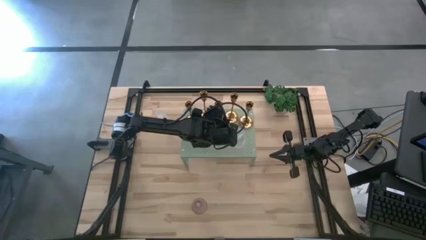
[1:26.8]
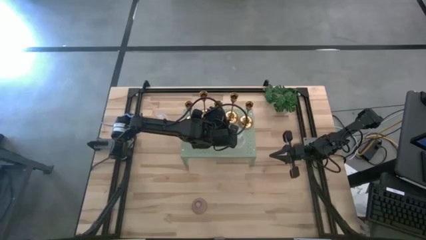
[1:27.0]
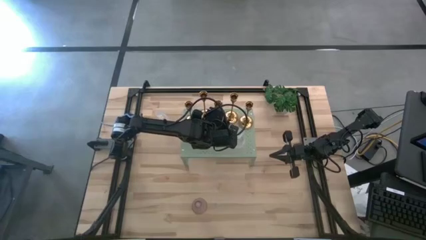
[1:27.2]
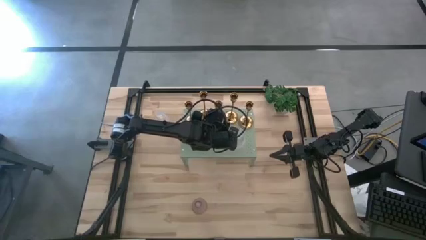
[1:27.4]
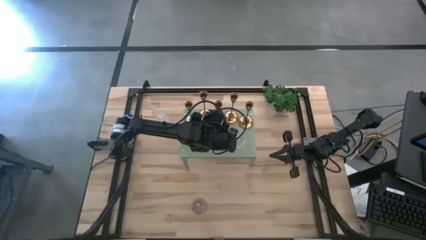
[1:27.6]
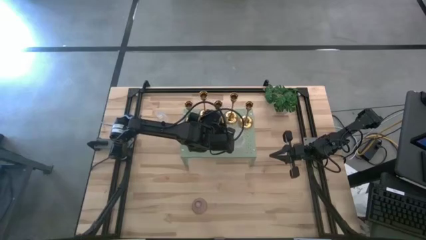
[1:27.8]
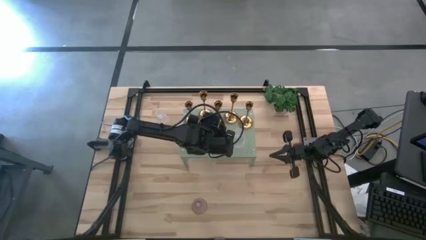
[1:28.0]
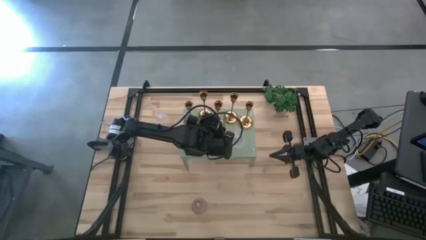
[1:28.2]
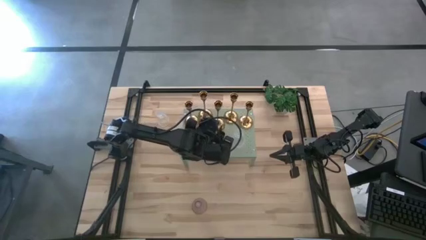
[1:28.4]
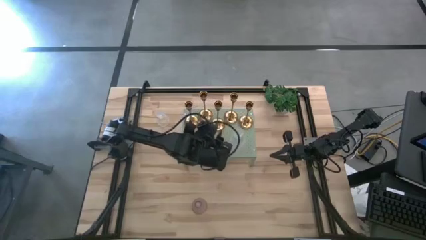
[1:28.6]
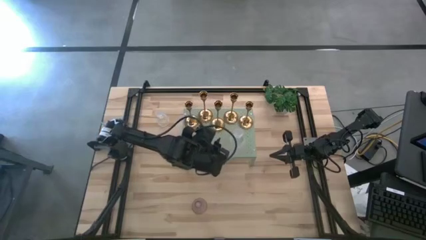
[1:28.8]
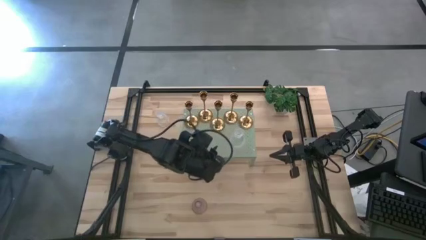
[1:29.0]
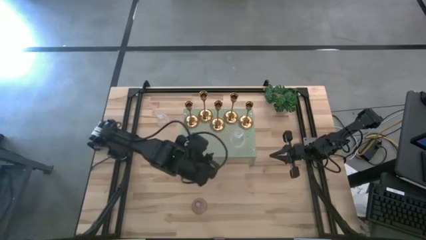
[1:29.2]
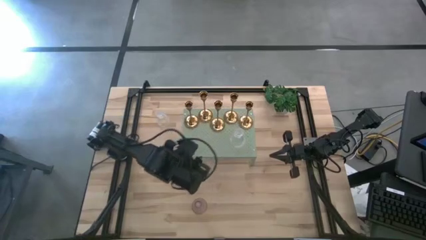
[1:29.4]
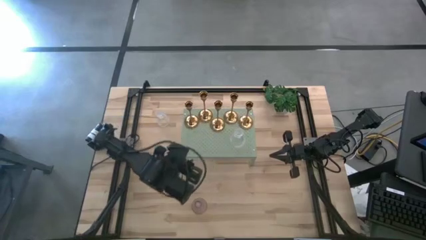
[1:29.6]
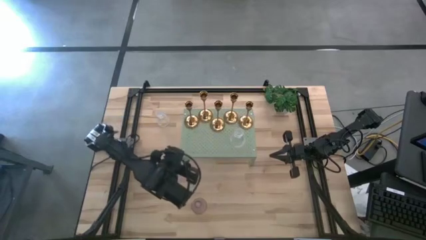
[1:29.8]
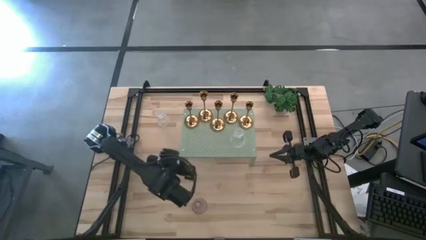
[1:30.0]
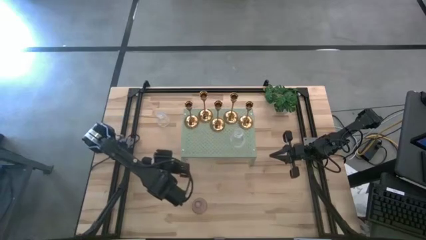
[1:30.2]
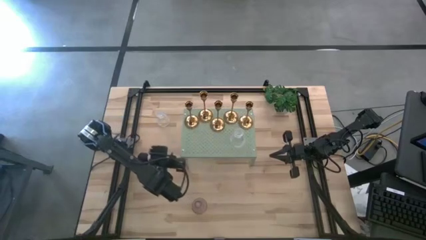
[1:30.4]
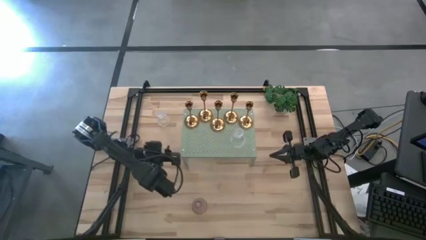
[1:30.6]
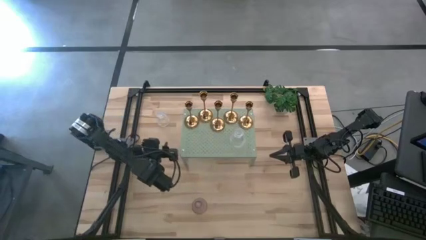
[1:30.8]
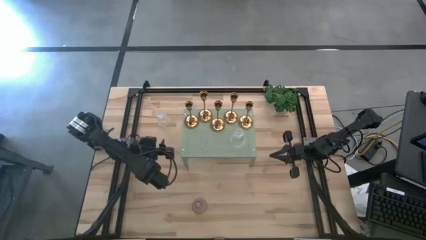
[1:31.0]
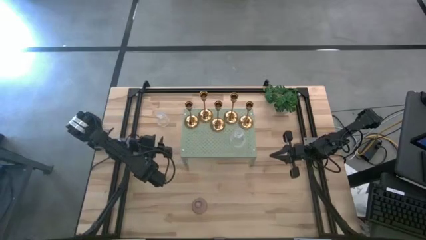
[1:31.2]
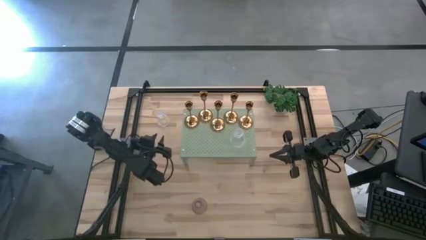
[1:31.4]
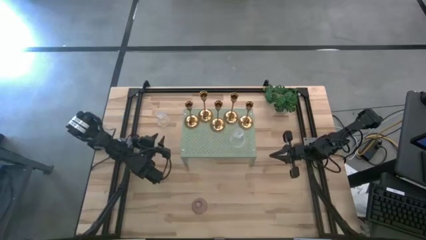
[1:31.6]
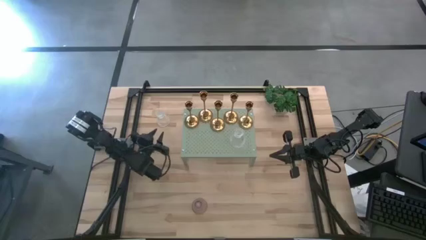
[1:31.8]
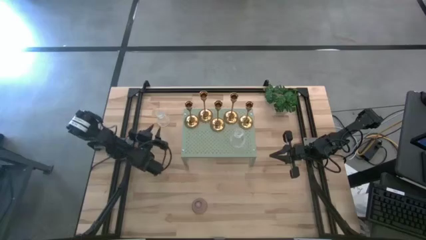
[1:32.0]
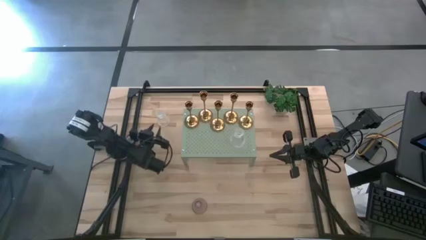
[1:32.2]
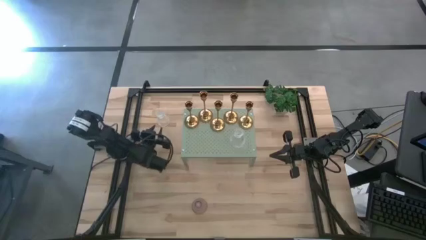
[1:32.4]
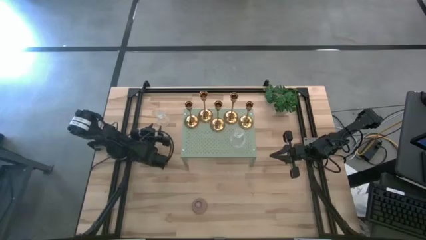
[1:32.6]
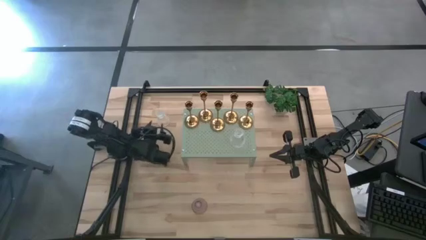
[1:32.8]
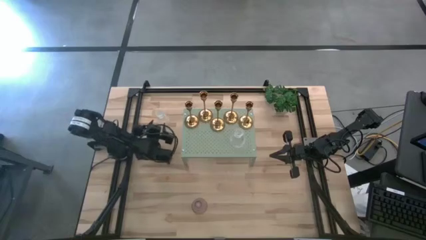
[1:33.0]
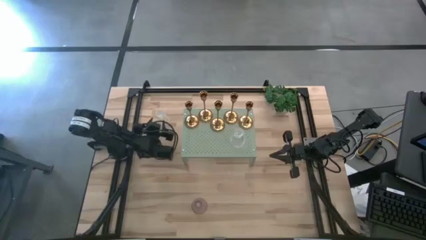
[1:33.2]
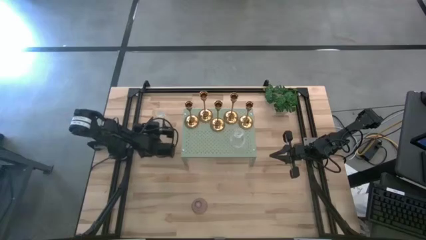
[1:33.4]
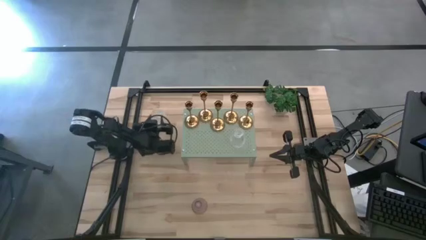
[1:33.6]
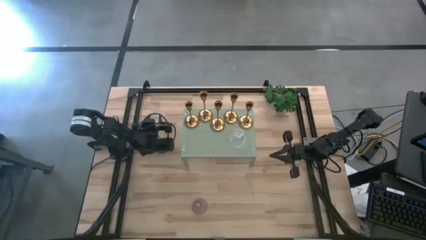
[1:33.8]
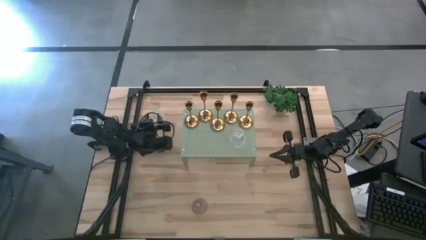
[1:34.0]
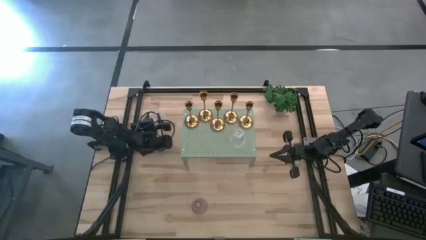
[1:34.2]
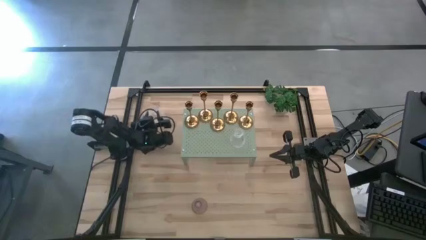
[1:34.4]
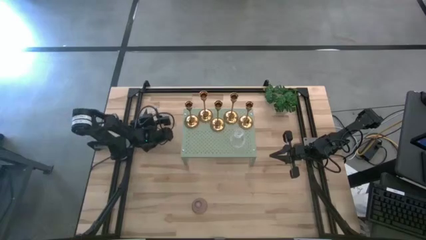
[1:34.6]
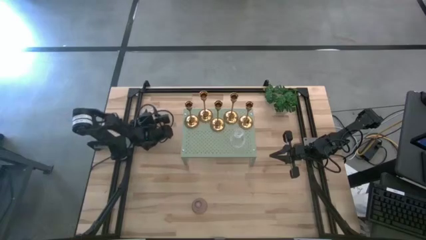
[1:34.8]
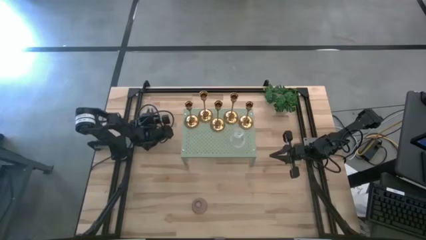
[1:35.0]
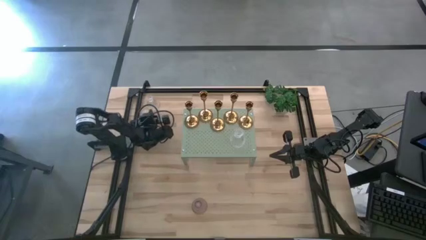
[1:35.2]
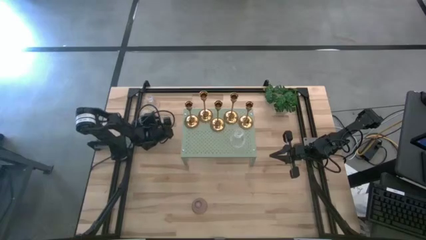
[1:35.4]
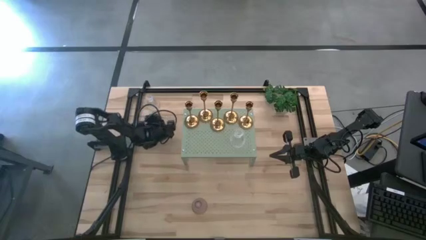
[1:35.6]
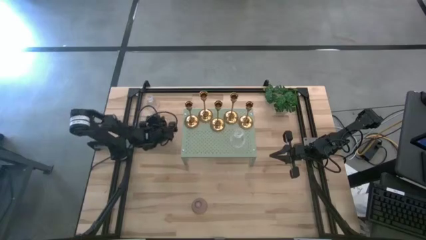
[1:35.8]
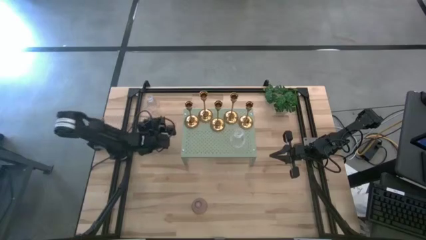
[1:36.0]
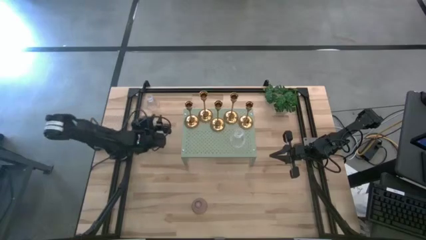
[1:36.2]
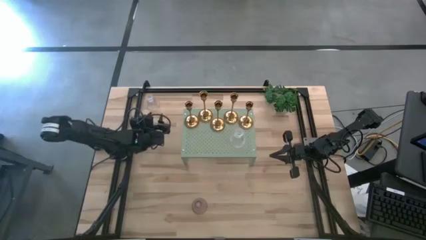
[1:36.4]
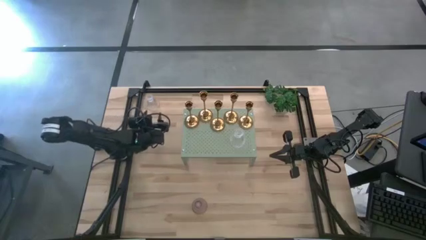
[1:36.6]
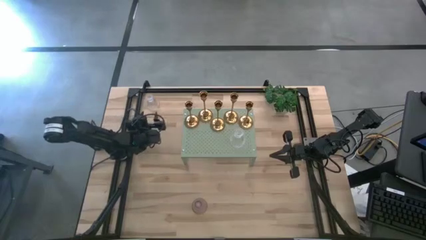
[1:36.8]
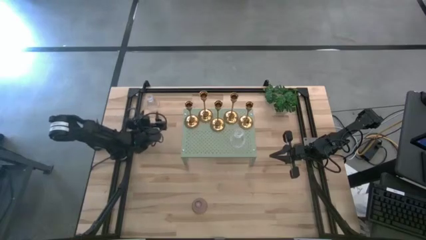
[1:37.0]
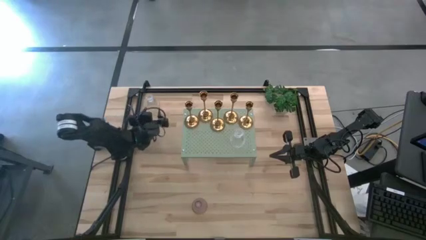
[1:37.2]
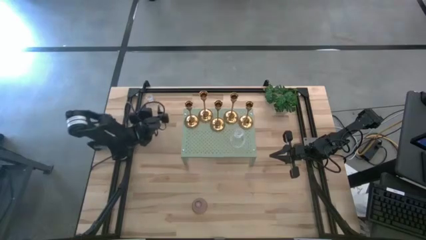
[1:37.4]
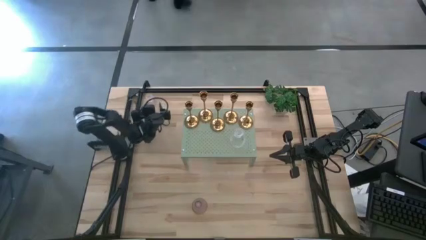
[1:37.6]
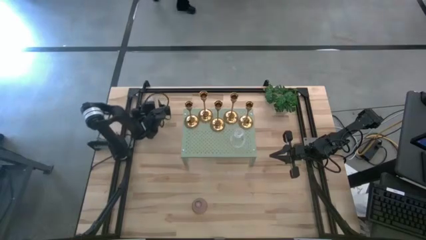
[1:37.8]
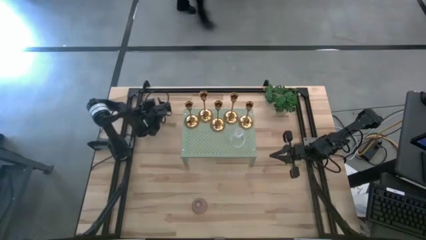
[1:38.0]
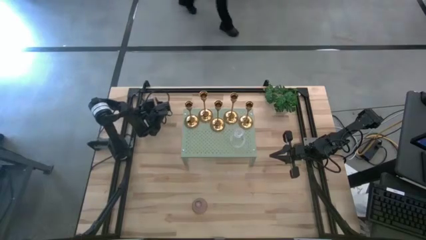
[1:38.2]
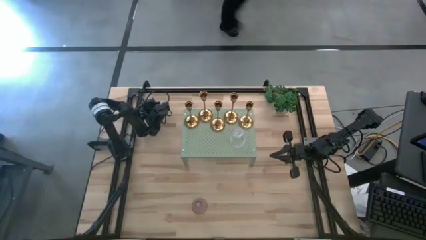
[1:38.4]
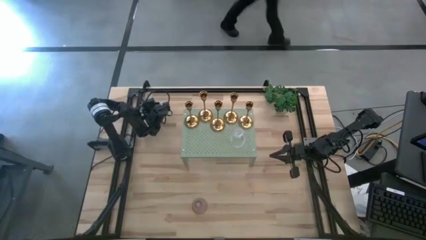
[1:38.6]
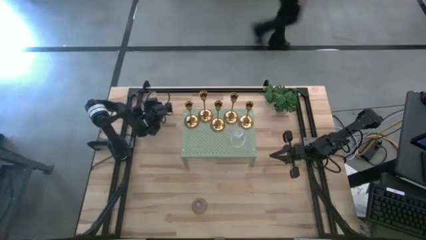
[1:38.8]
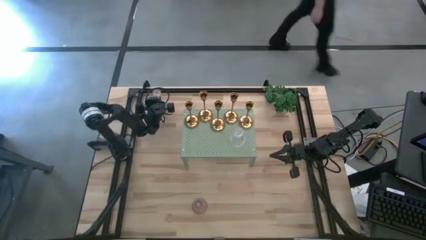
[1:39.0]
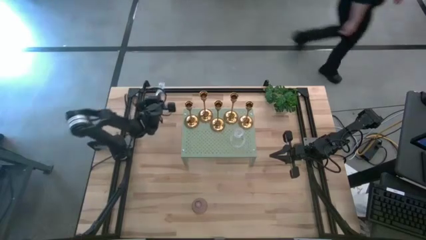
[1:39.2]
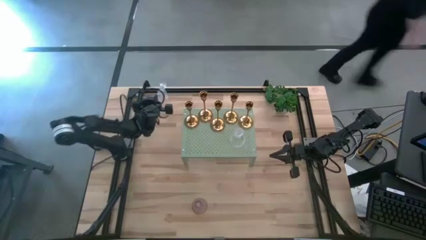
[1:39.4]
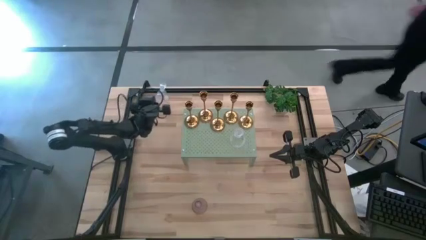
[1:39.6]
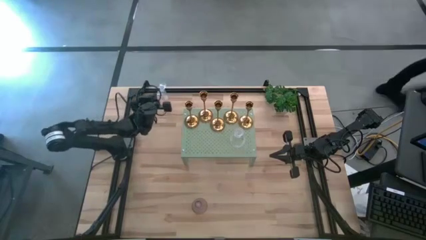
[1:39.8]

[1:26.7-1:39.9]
Task: Pick & Place candle stick holders
Put the white crystal glass candle holder on the shelf
